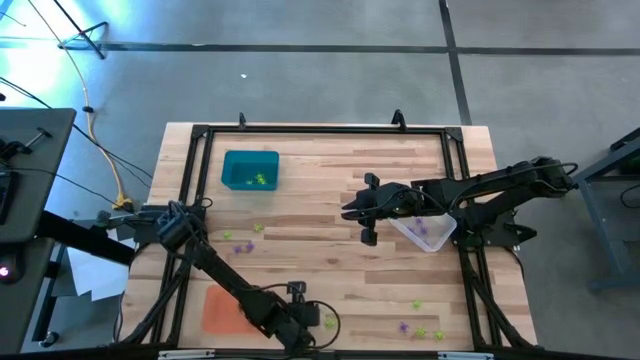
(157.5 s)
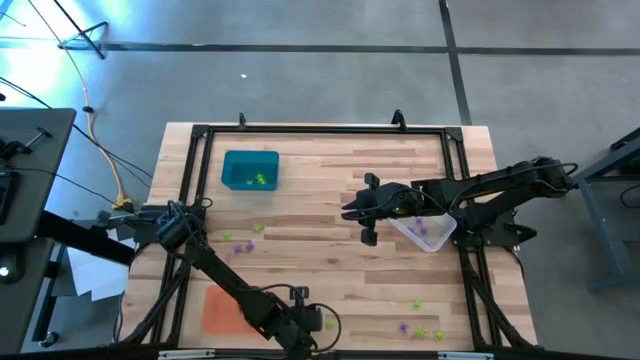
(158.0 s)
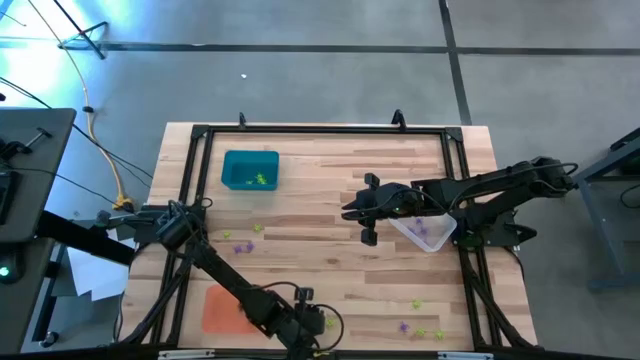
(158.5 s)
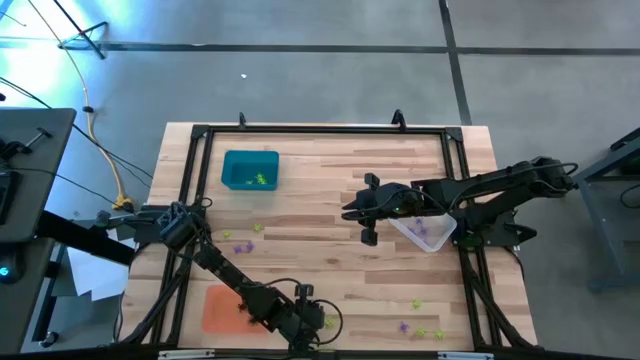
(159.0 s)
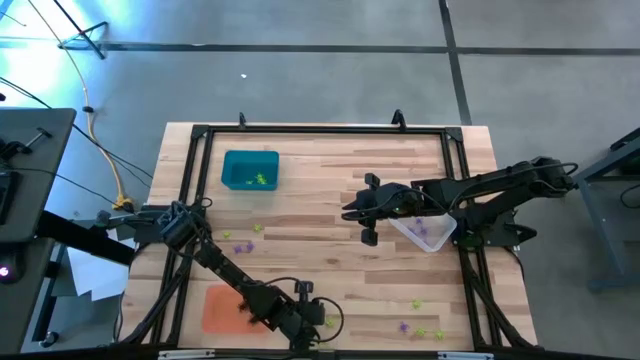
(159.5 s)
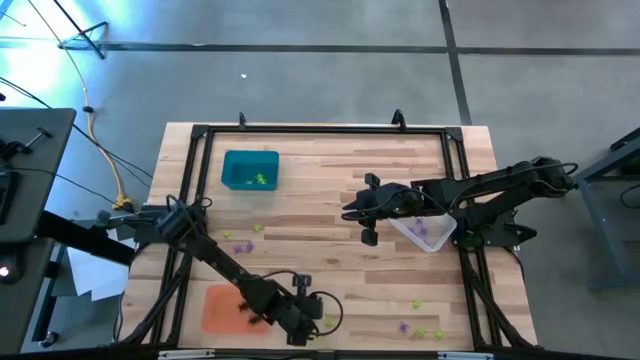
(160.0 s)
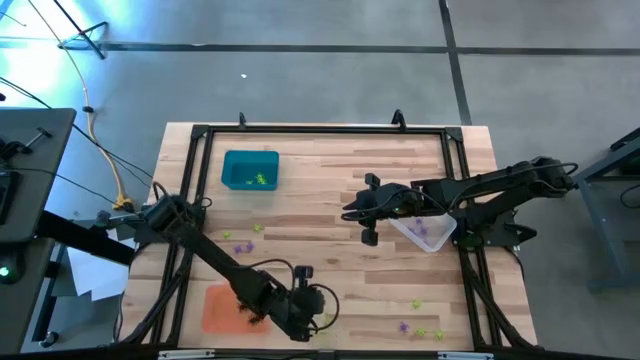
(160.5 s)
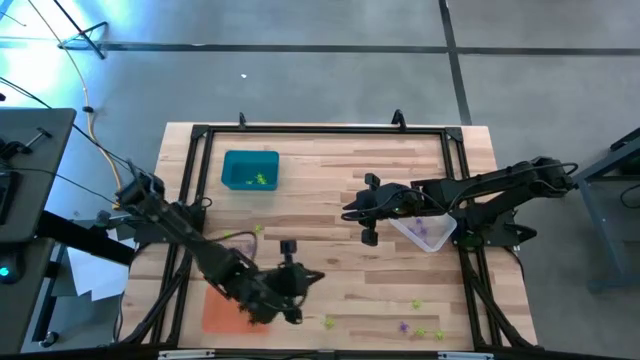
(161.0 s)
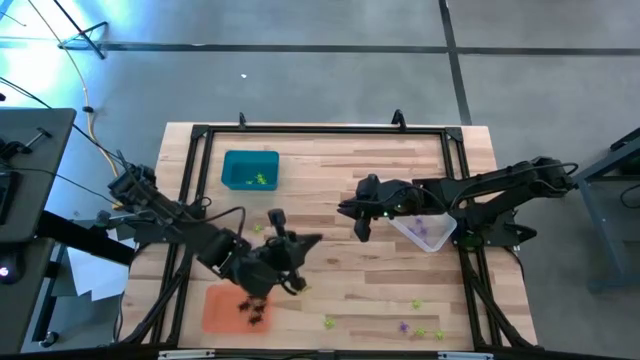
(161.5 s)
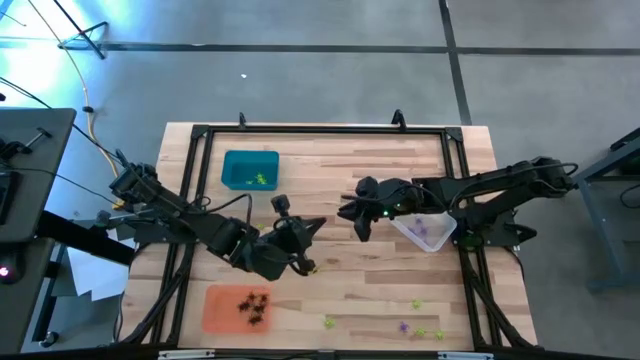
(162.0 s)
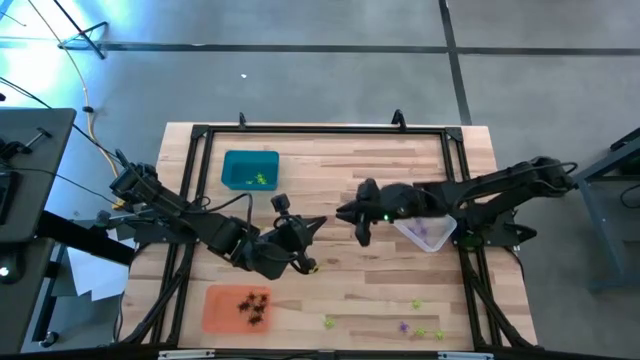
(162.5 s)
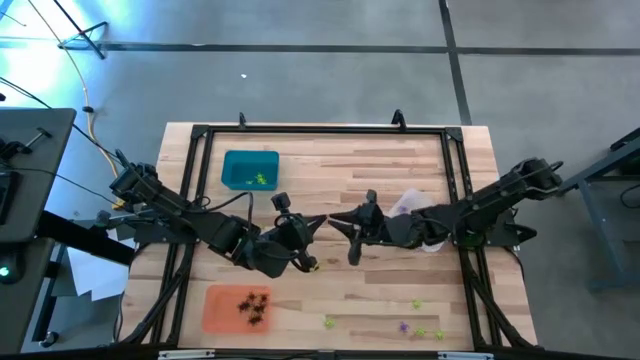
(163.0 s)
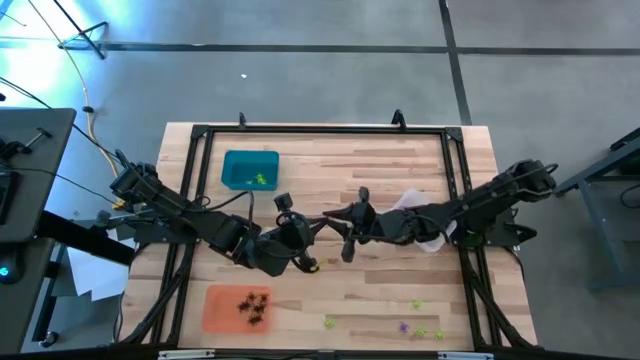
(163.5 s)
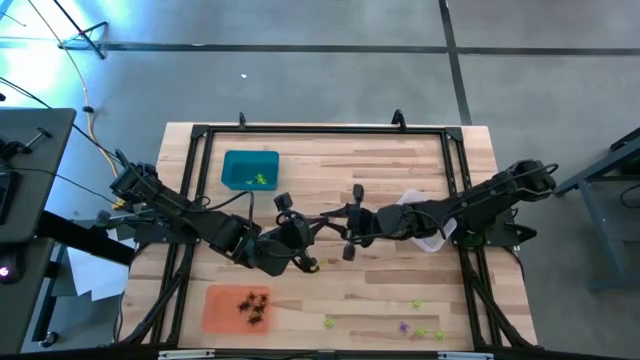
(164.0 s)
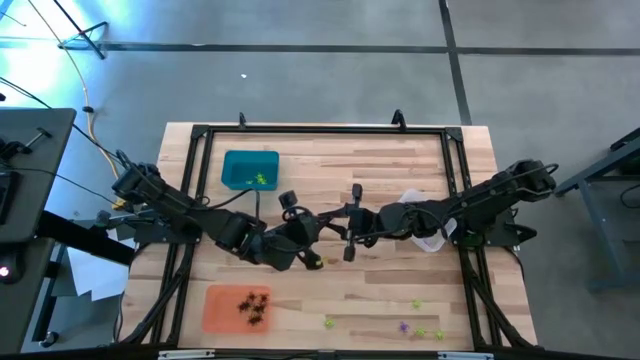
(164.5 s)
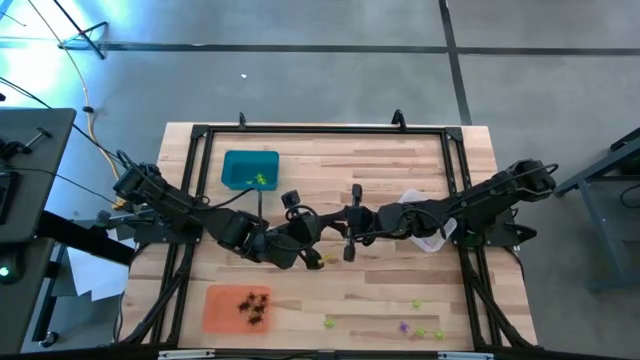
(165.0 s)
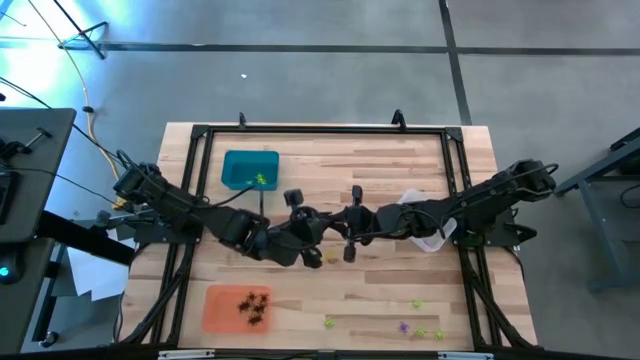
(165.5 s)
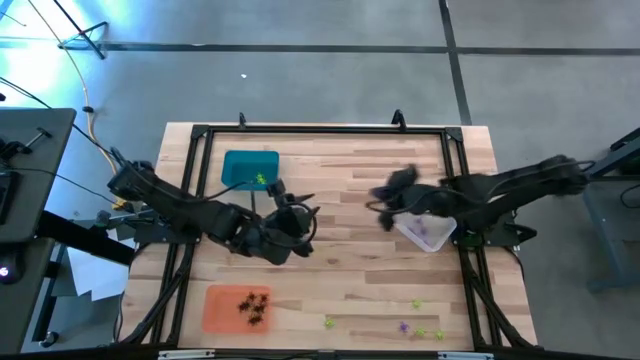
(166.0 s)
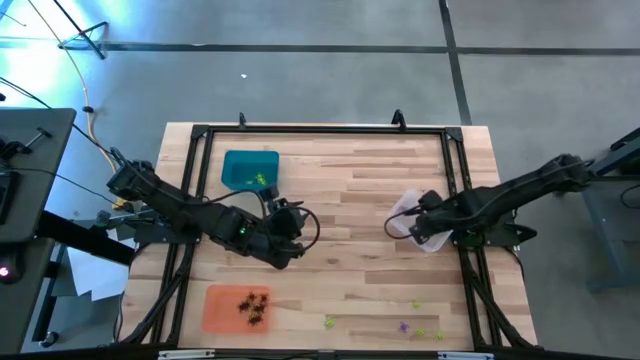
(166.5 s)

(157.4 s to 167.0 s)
Task: Sort Halloween decoration
Put the violet spider toy into the transparent bin

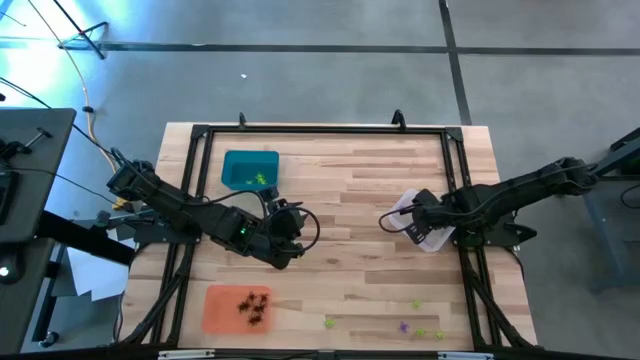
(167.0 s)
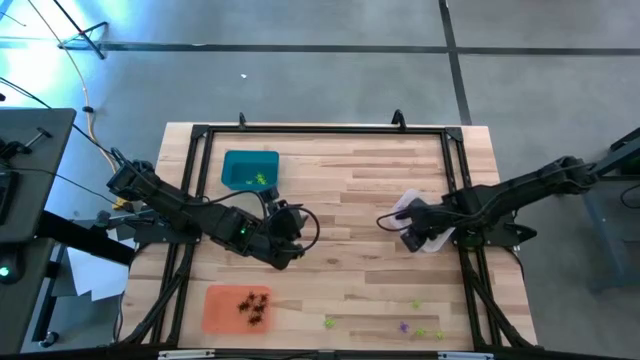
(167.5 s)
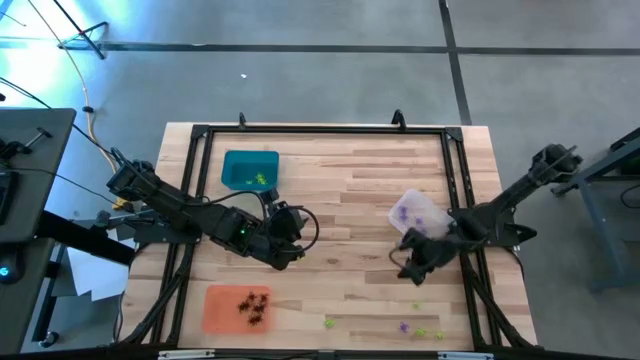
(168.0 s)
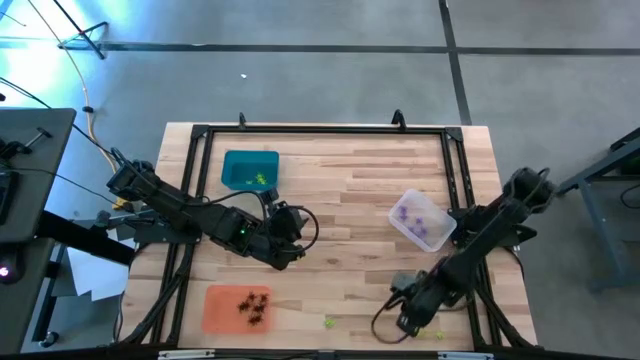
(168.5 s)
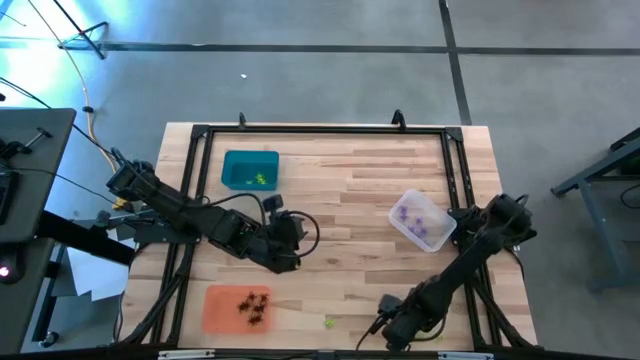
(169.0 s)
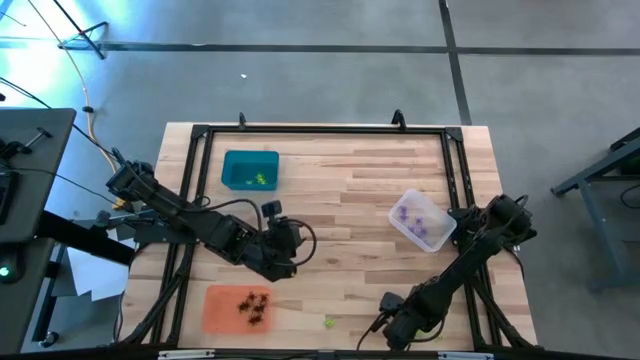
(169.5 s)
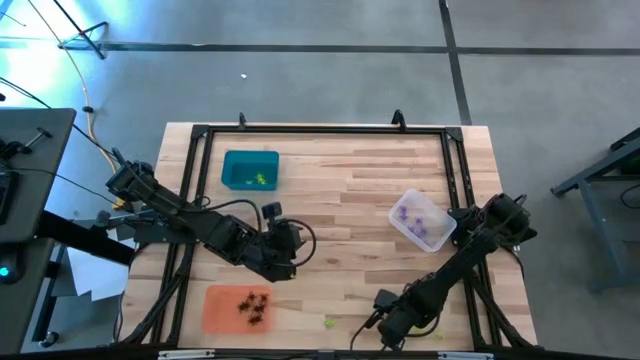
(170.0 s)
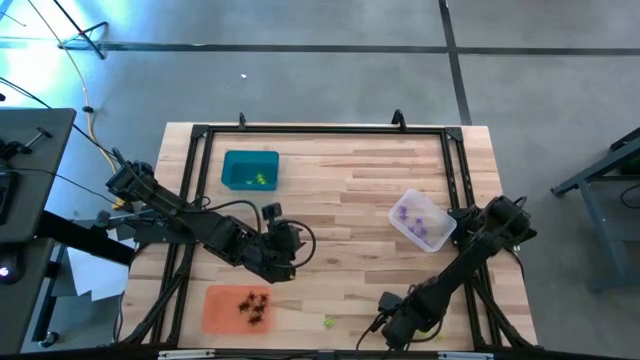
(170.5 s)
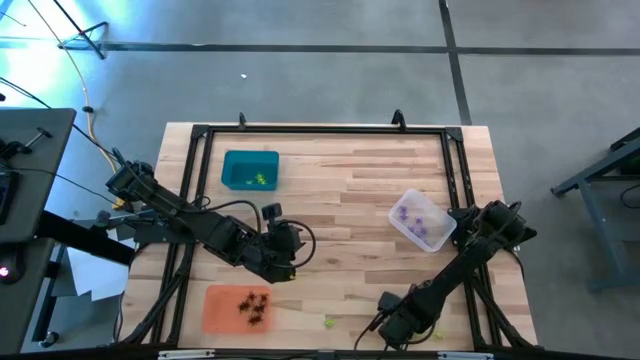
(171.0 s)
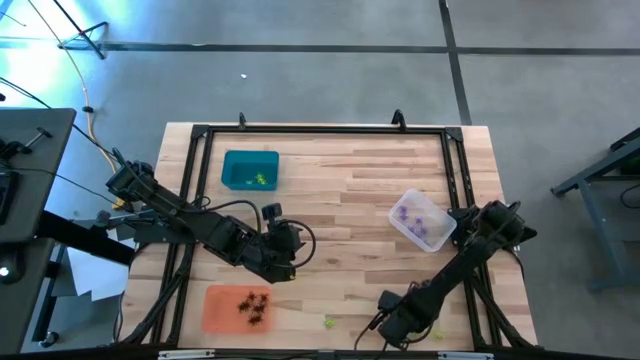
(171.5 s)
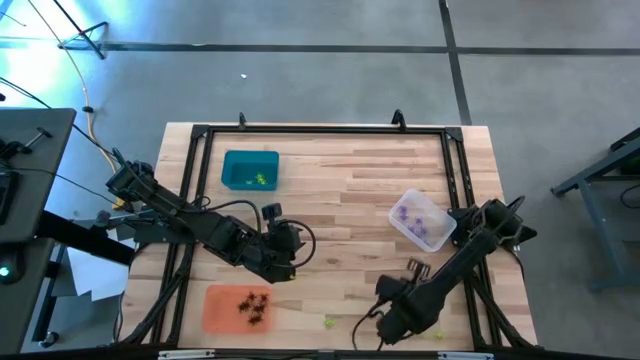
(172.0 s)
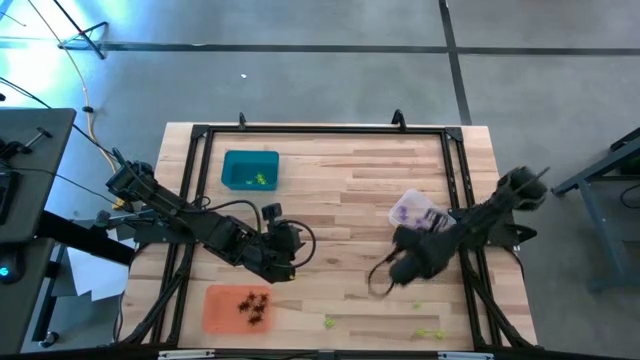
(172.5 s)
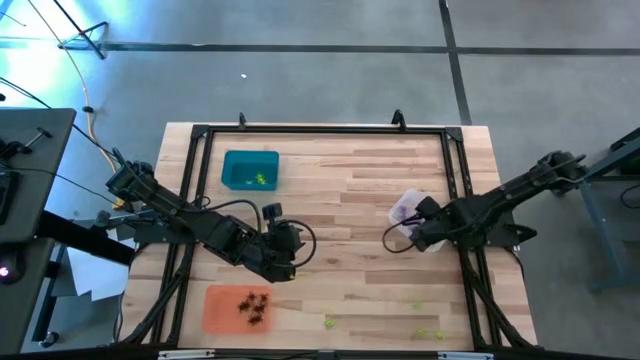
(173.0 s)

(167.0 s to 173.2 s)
Put the violet spider toy into the transparent bin

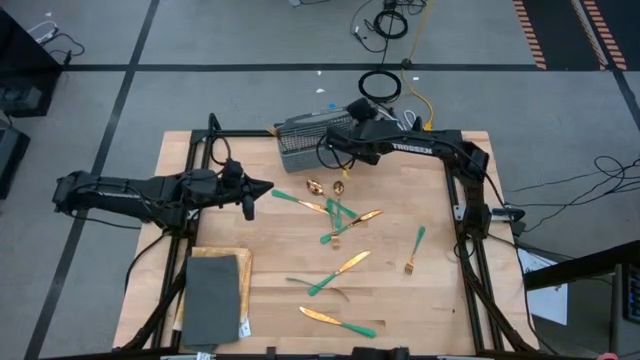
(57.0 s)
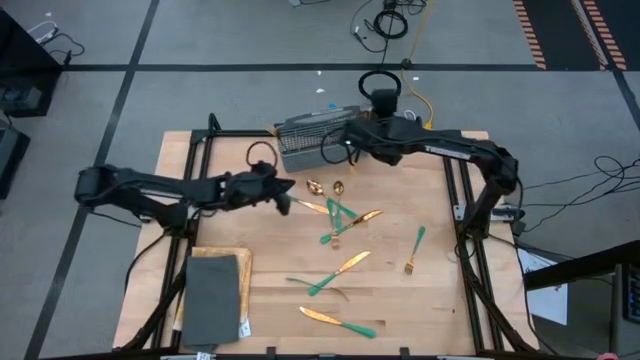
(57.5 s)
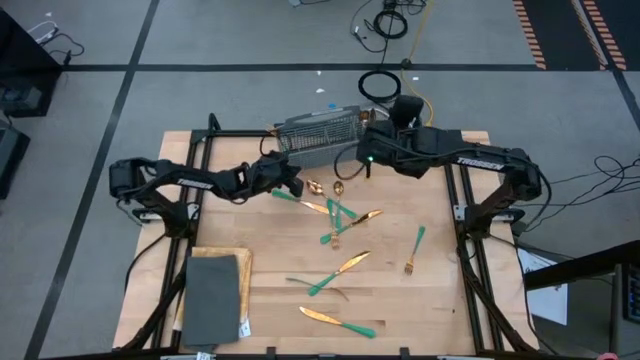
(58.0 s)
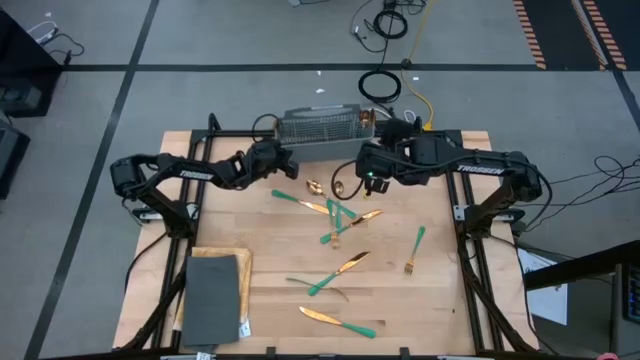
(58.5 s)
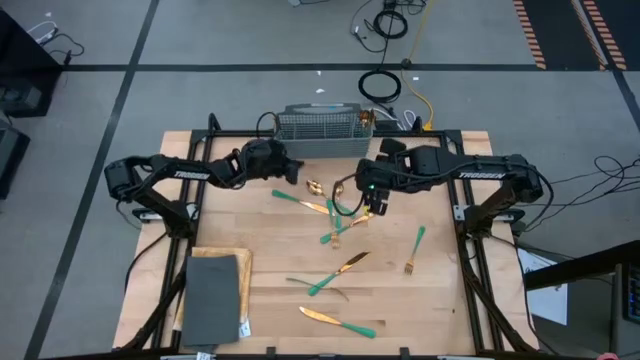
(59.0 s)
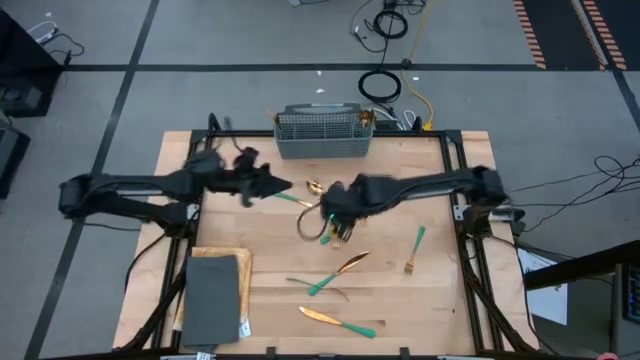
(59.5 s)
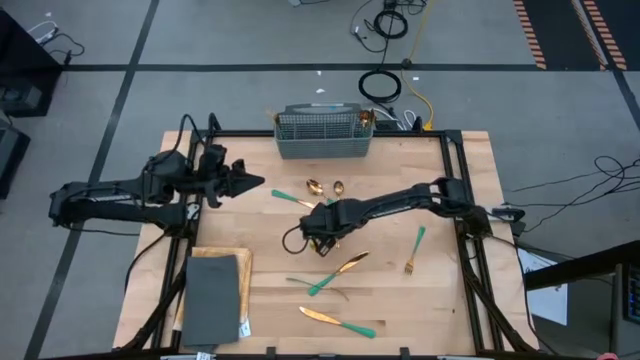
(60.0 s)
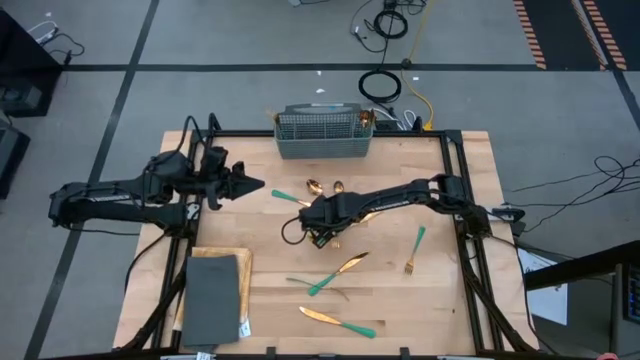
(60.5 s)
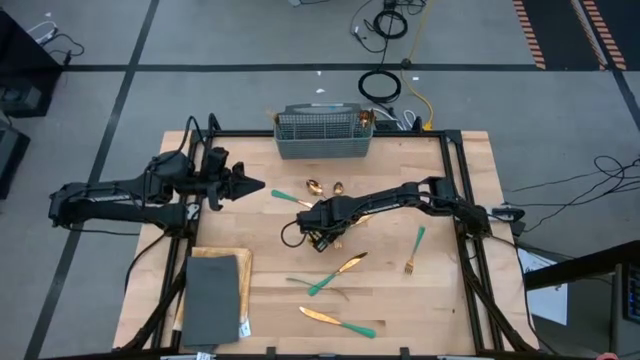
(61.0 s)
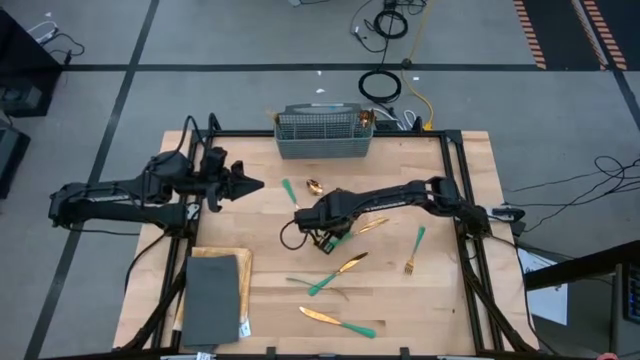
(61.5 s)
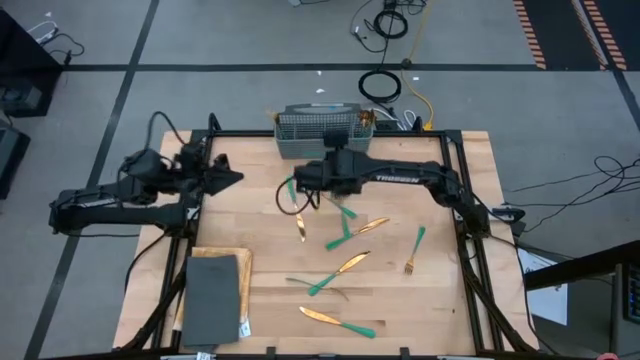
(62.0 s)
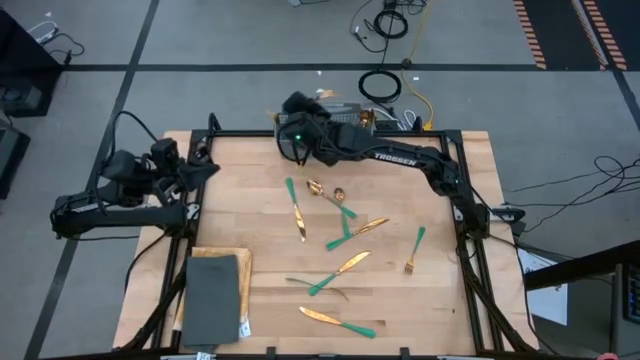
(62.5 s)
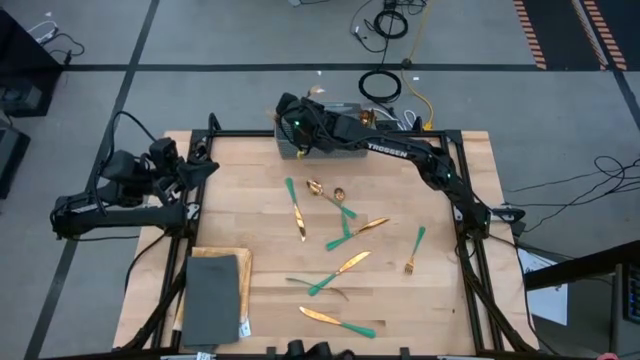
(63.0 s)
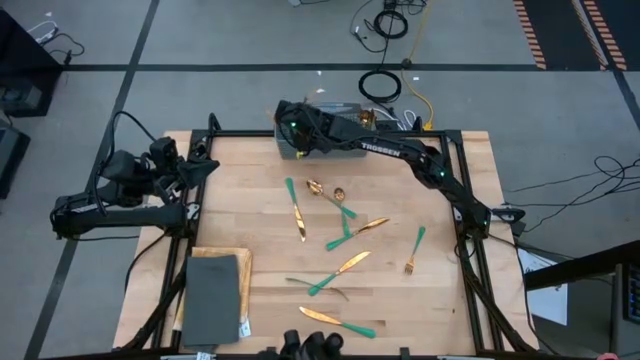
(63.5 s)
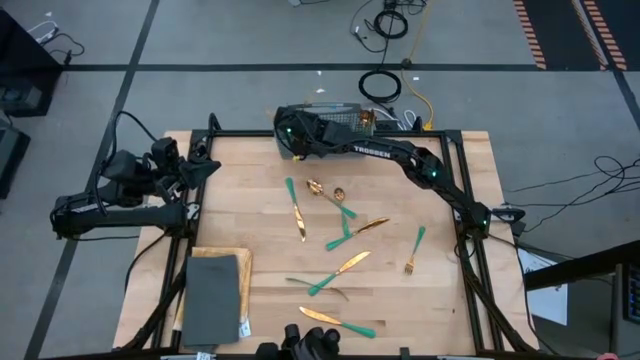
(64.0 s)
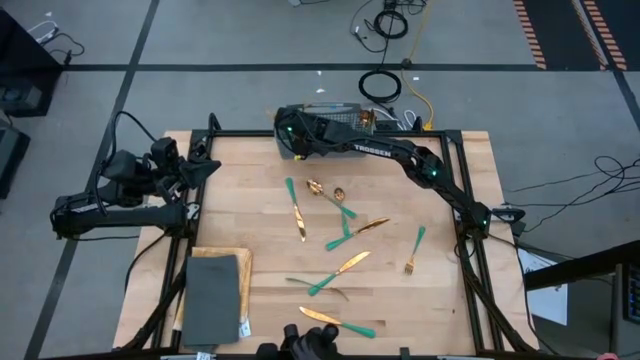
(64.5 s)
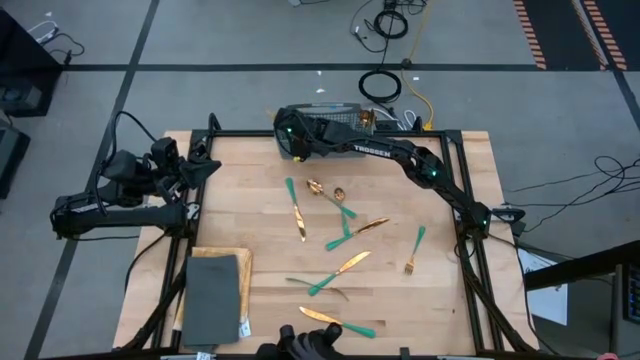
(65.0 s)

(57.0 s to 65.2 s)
Task: Sort silverware
Put the green fork into the silverware basket
